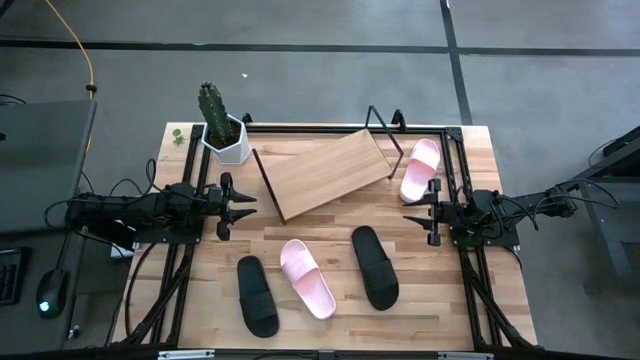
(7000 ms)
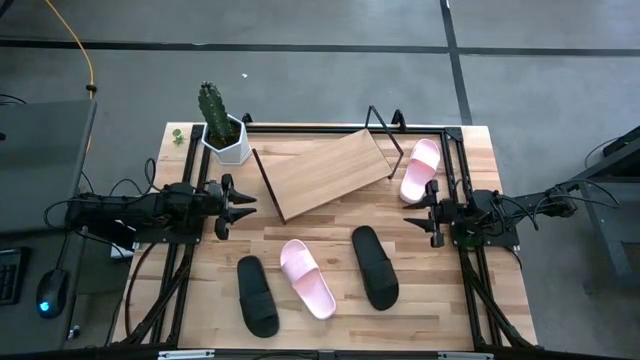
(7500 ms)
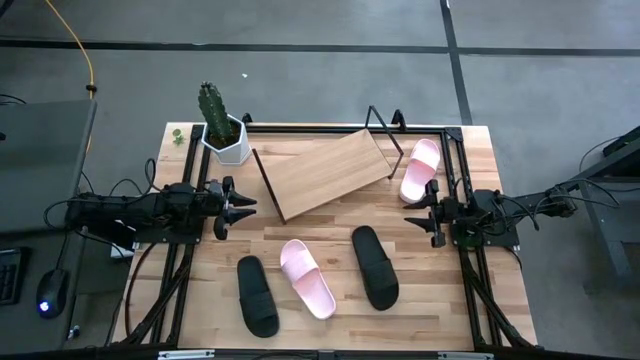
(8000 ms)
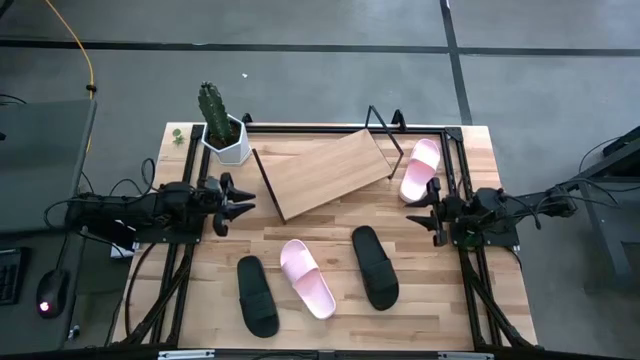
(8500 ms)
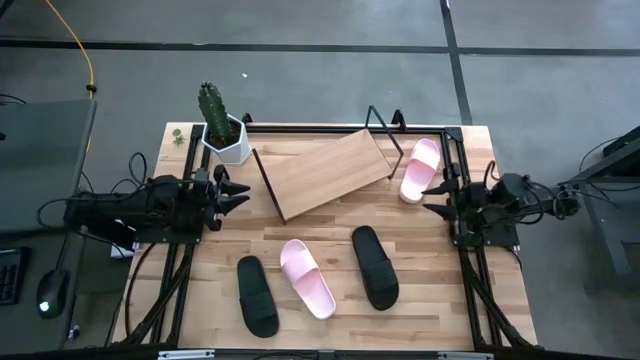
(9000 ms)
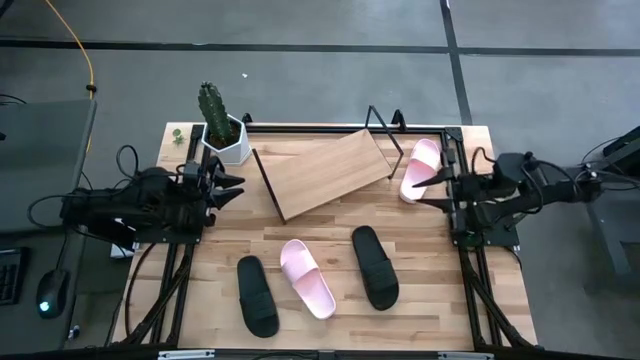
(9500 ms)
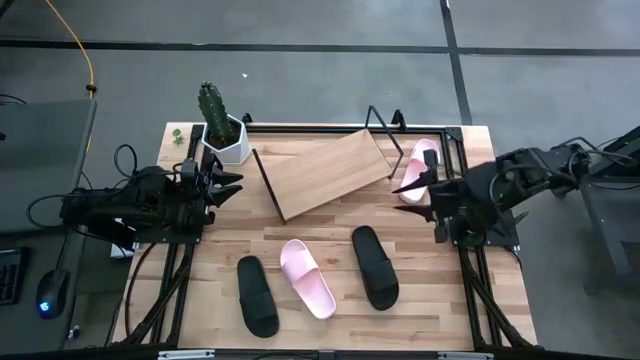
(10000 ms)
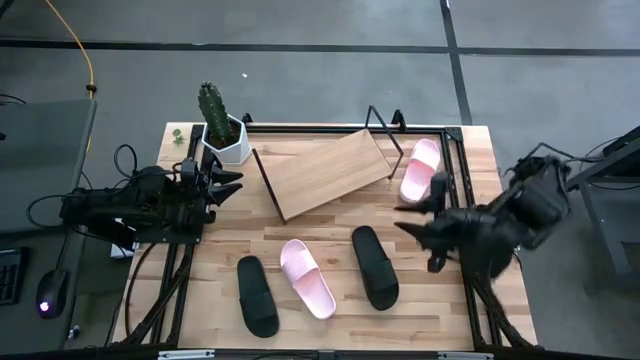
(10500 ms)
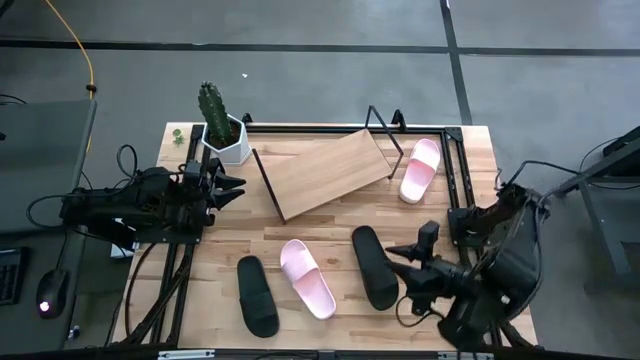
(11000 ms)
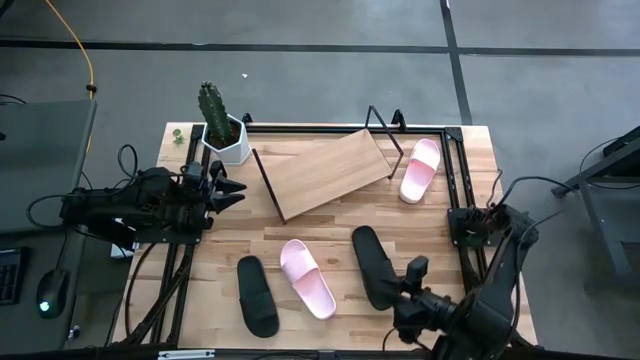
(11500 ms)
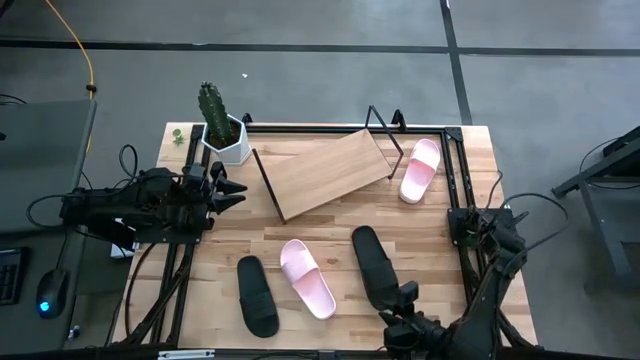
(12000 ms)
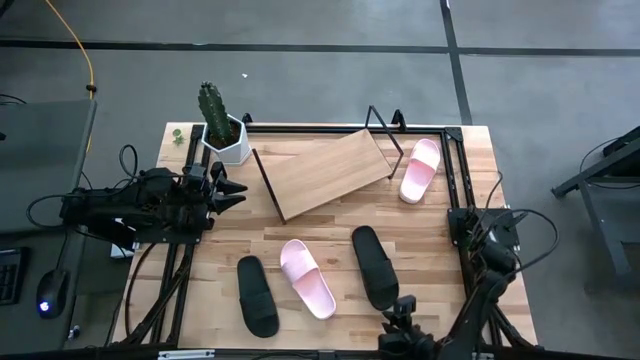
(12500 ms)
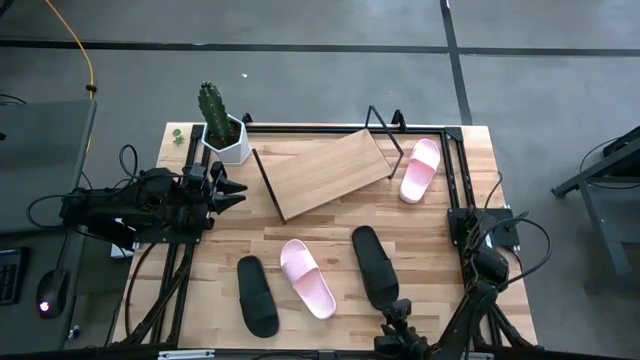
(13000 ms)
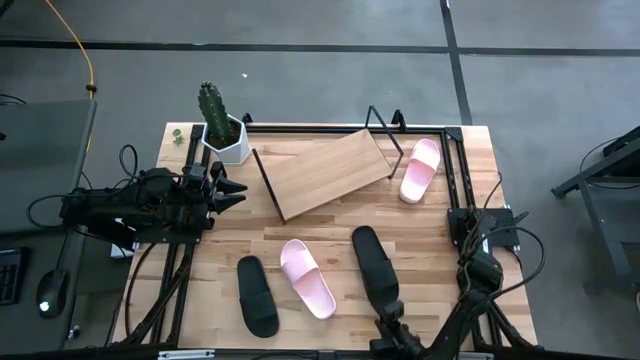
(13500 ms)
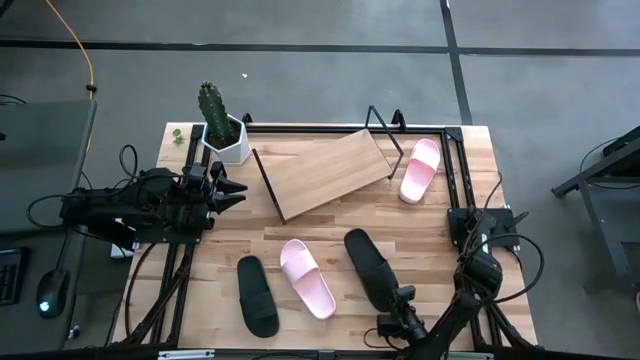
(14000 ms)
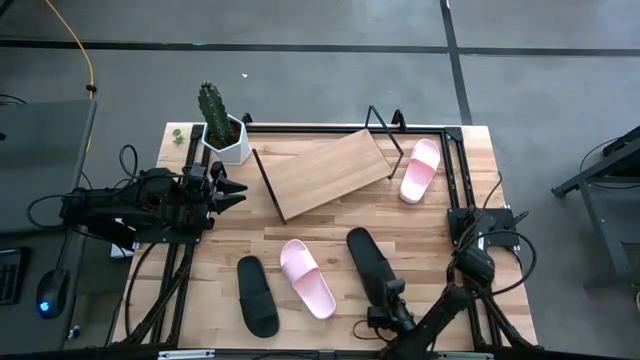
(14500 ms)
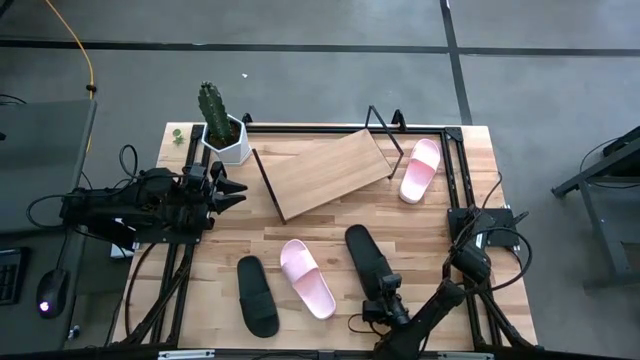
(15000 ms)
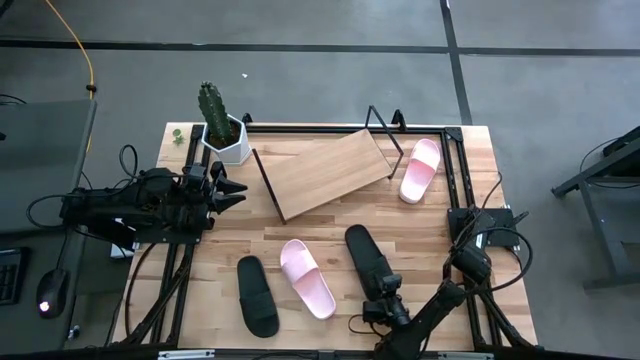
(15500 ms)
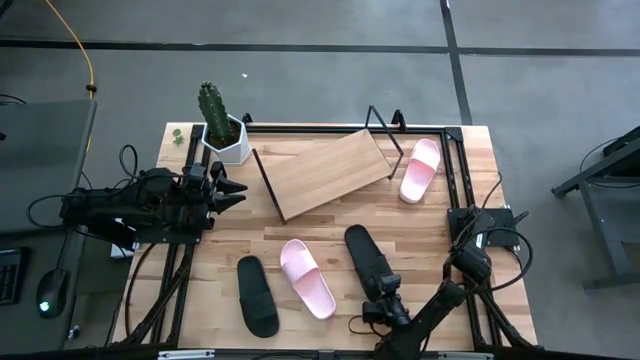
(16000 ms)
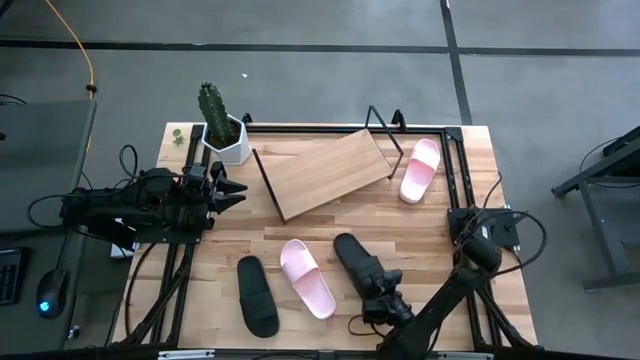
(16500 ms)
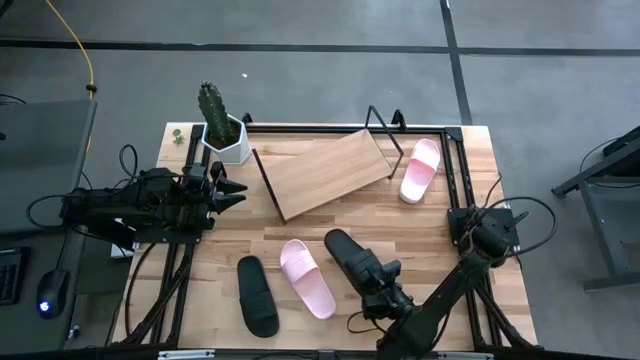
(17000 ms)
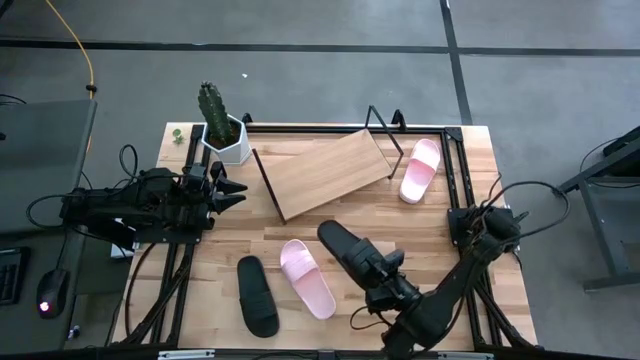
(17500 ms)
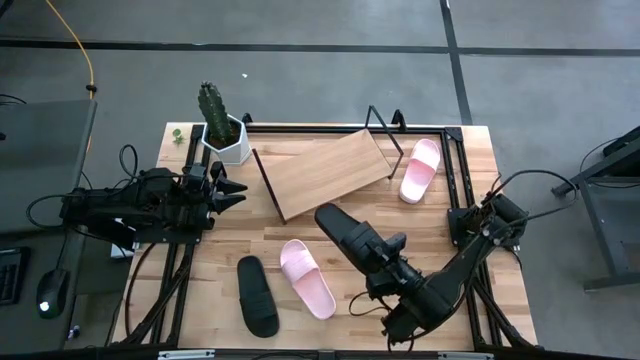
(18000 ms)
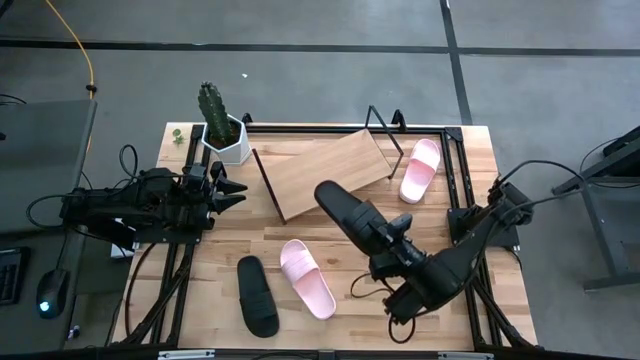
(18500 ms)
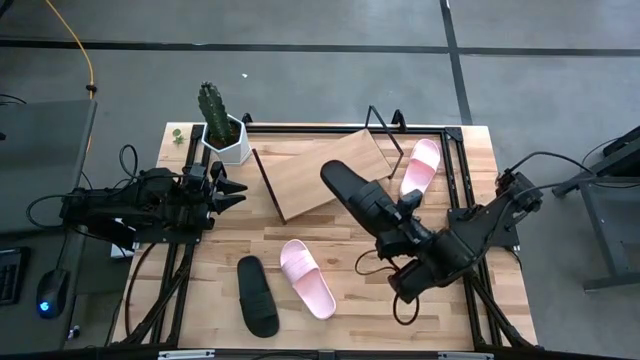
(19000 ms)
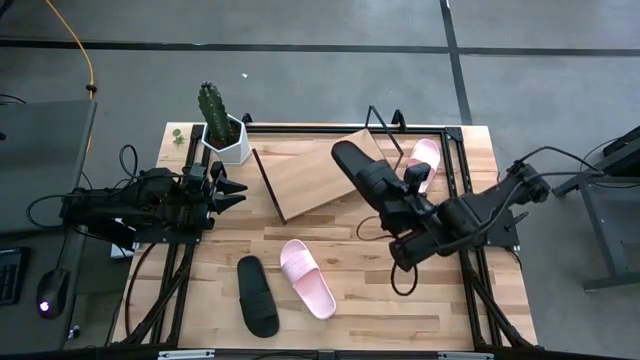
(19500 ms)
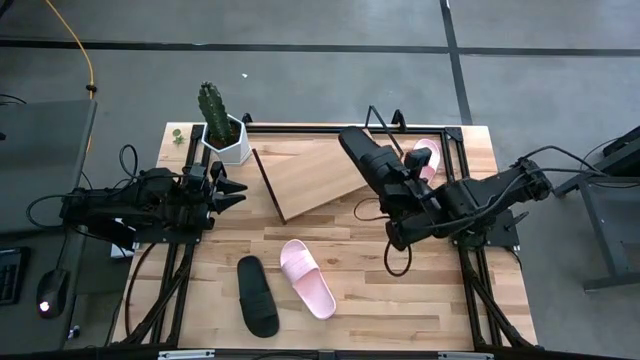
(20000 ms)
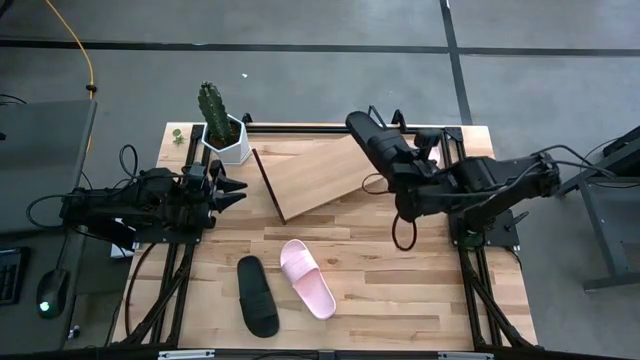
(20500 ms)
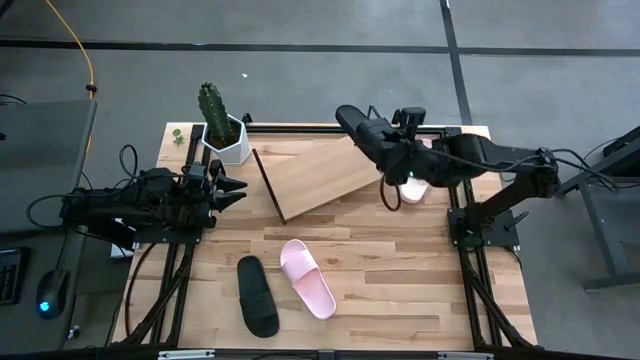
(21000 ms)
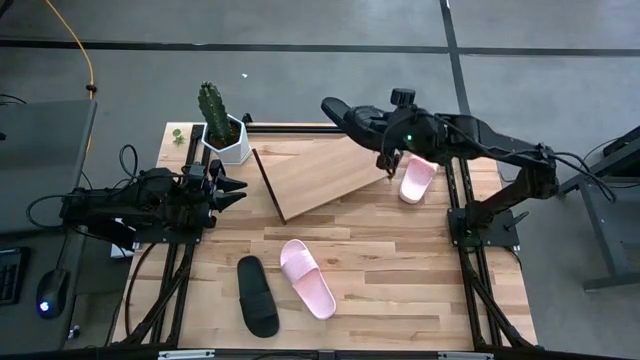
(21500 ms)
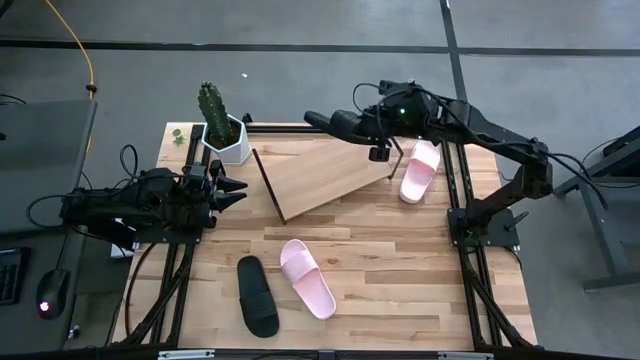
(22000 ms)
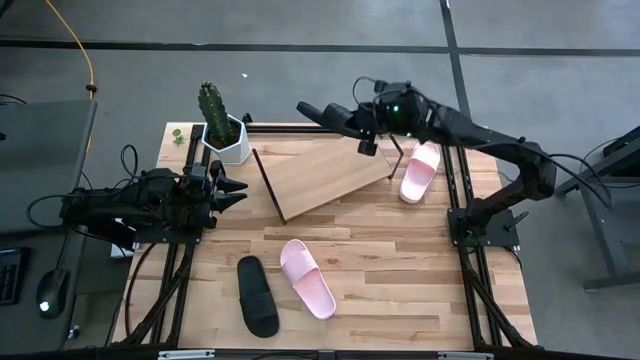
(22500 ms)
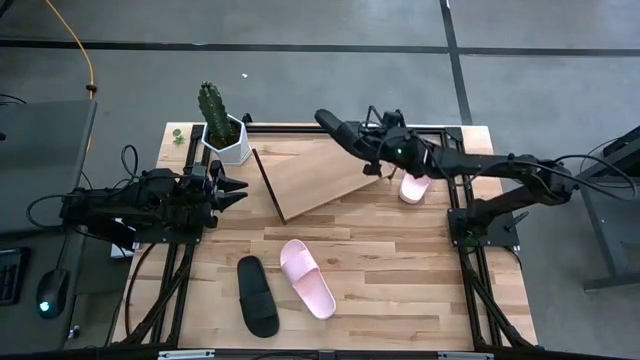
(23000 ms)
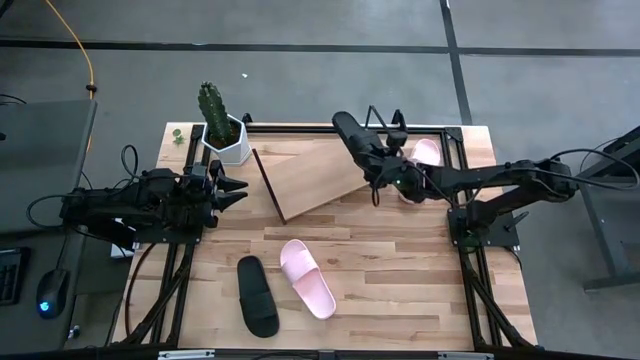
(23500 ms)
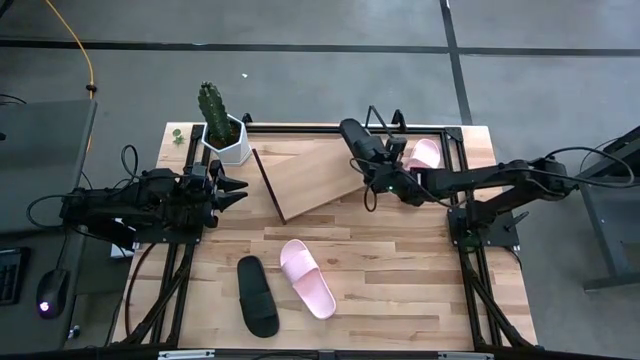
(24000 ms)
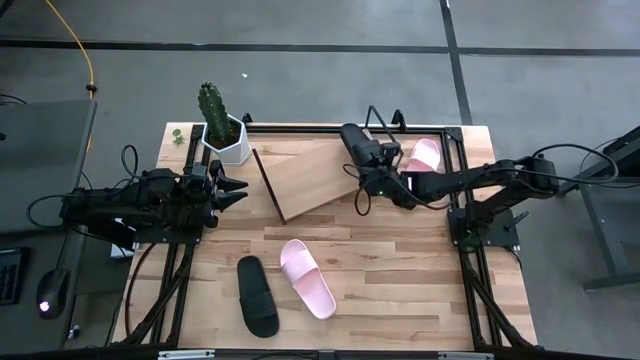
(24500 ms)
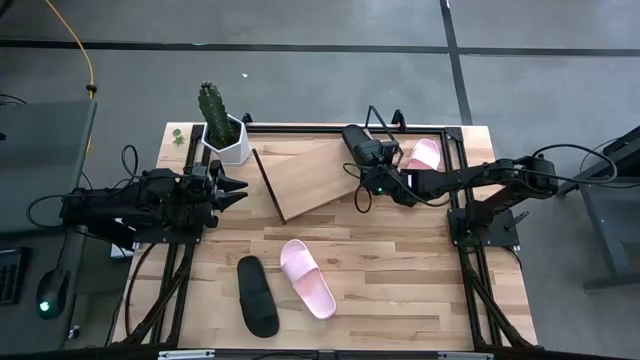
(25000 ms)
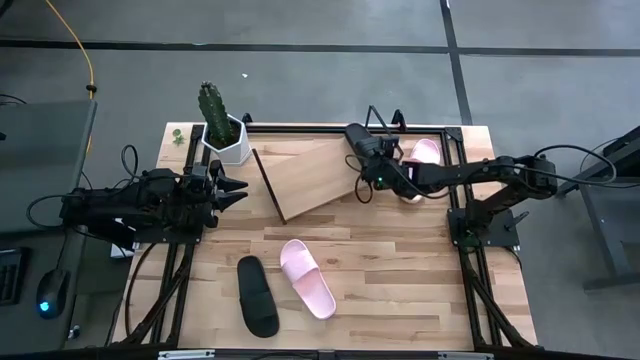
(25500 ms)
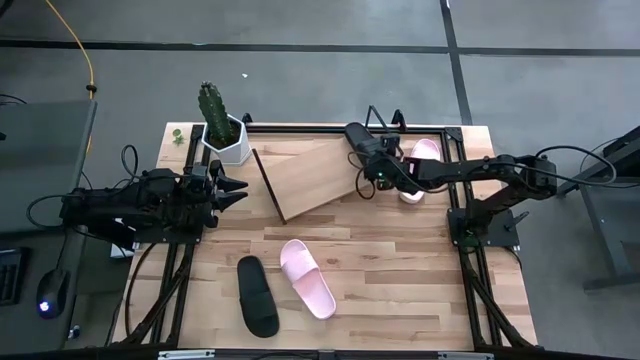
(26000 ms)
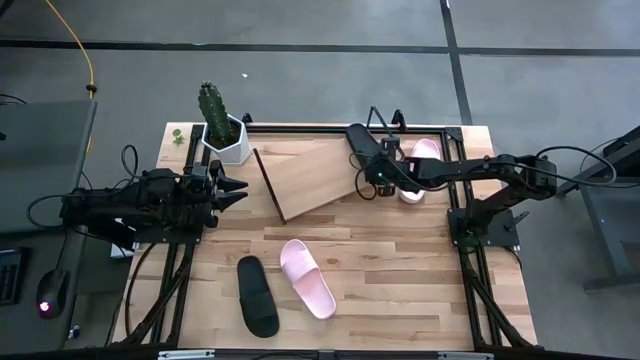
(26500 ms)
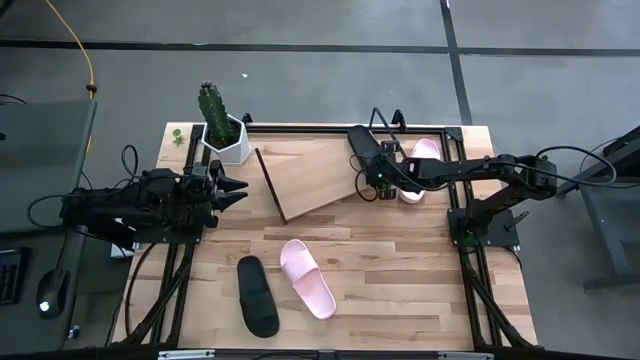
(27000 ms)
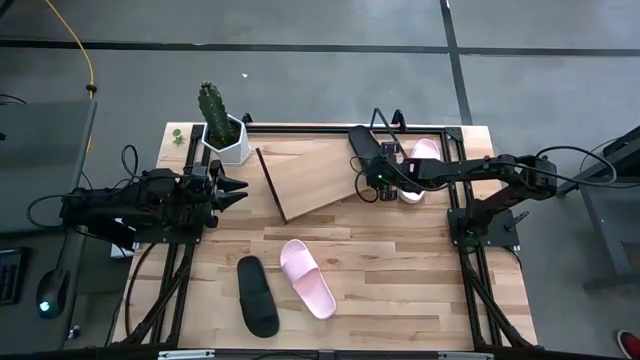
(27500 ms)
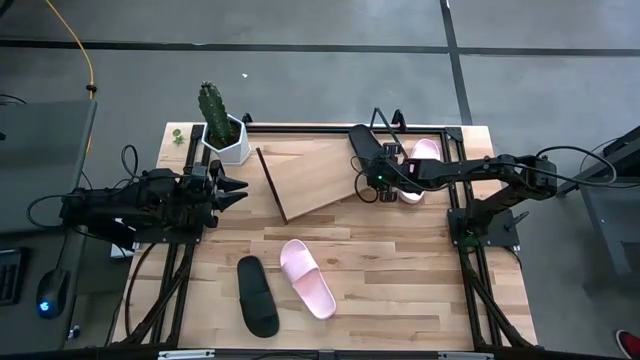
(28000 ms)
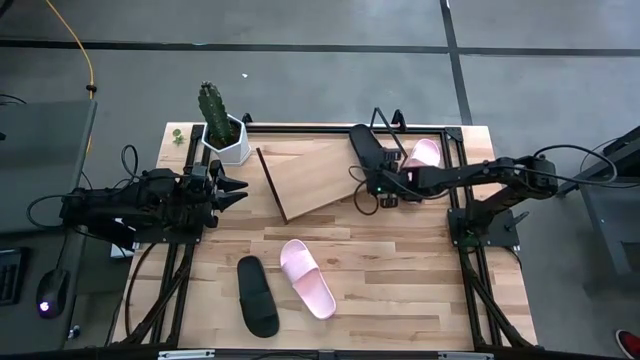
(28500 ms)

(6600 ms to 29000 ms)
Task: Pick and place slides into the shelf
Put the right black slide on the shelf
